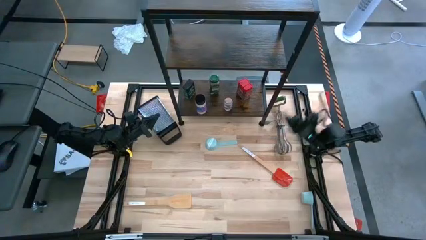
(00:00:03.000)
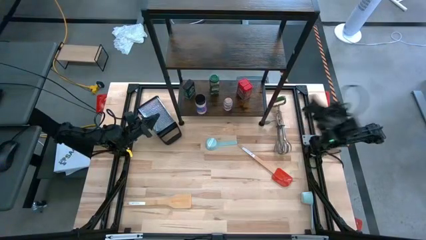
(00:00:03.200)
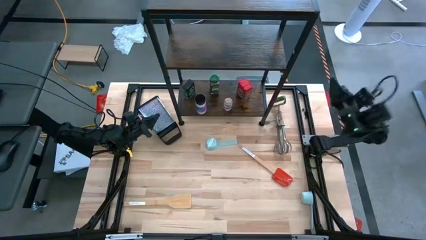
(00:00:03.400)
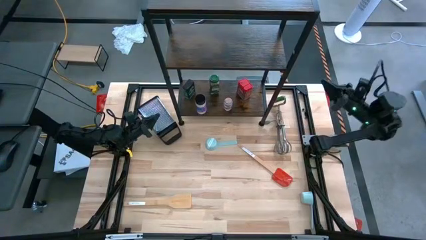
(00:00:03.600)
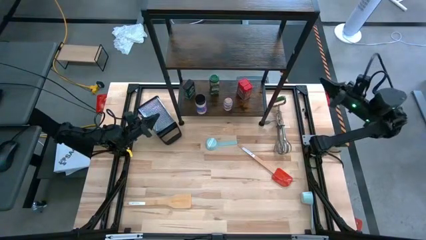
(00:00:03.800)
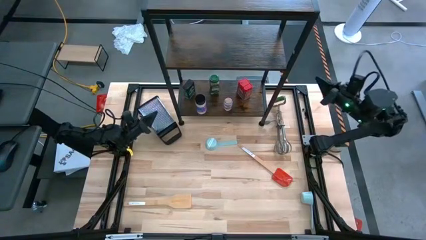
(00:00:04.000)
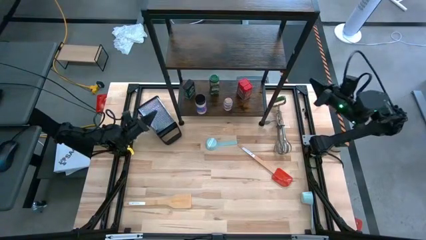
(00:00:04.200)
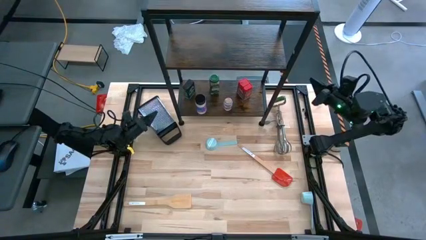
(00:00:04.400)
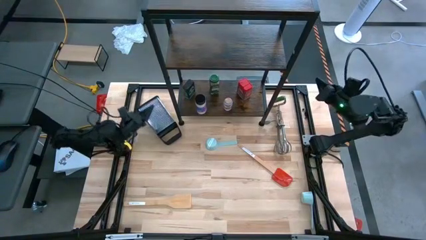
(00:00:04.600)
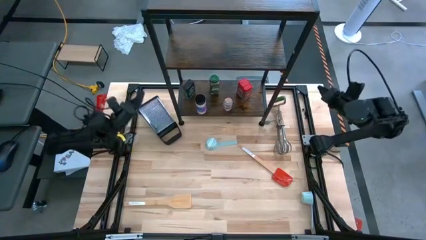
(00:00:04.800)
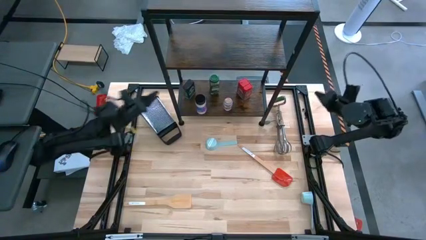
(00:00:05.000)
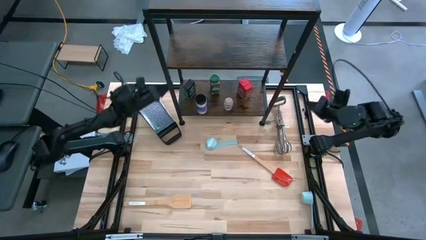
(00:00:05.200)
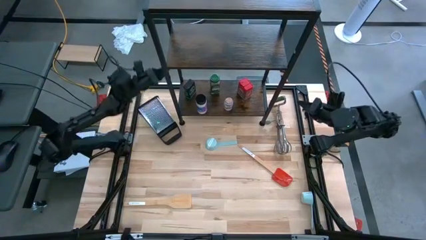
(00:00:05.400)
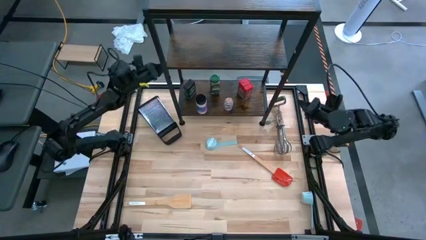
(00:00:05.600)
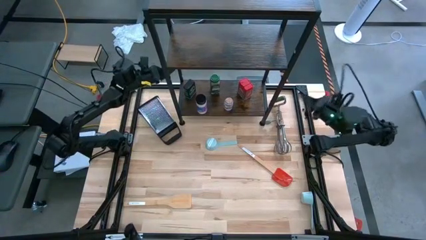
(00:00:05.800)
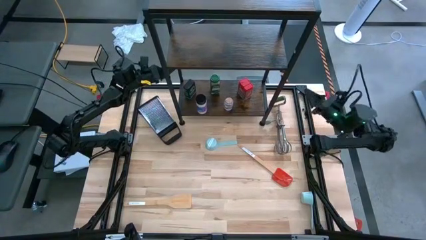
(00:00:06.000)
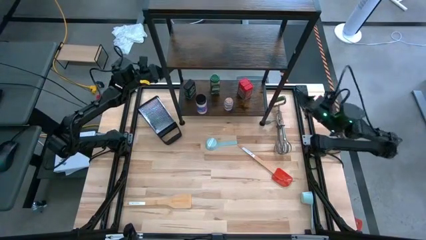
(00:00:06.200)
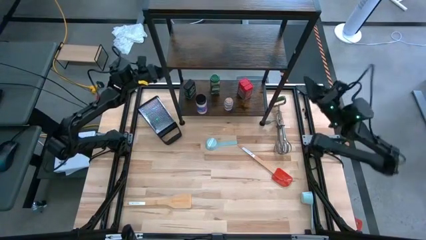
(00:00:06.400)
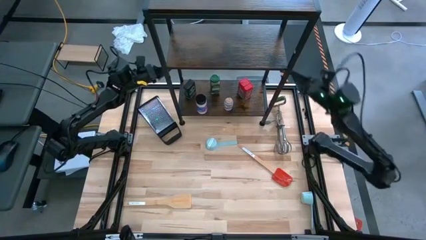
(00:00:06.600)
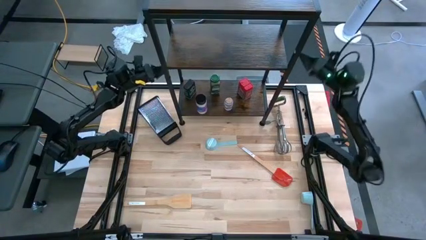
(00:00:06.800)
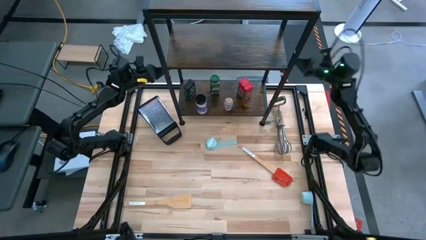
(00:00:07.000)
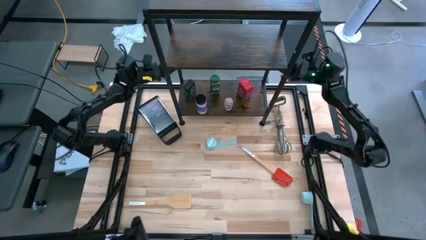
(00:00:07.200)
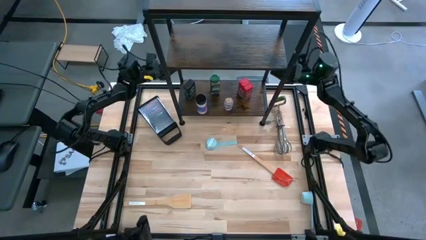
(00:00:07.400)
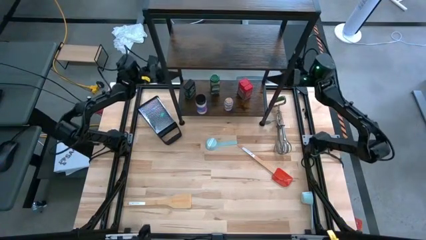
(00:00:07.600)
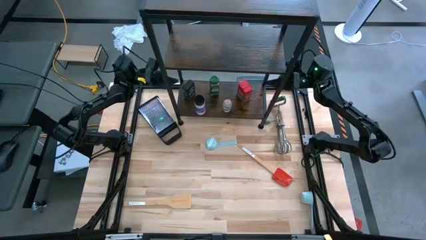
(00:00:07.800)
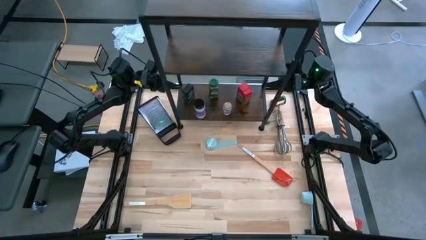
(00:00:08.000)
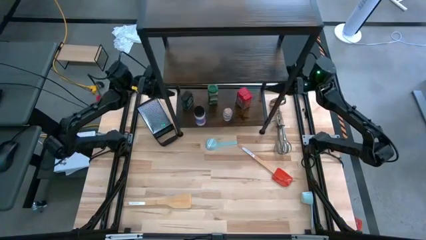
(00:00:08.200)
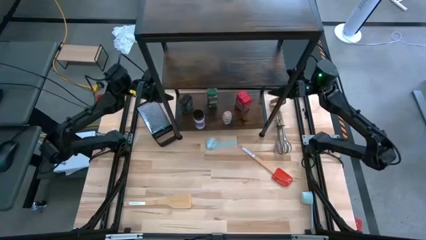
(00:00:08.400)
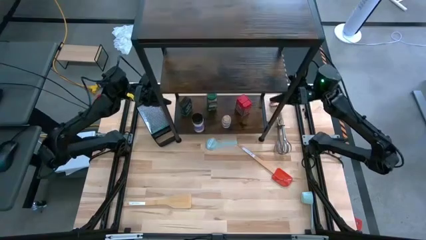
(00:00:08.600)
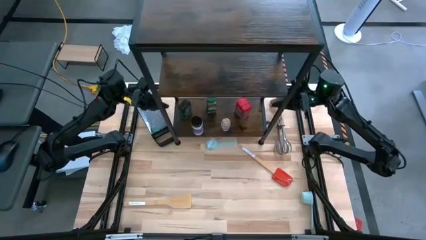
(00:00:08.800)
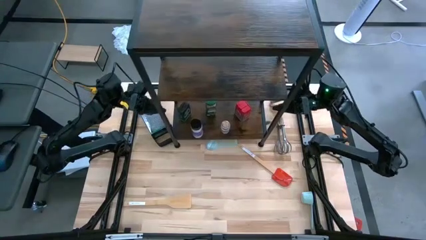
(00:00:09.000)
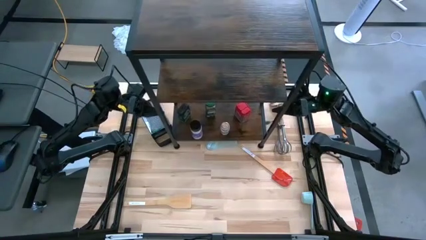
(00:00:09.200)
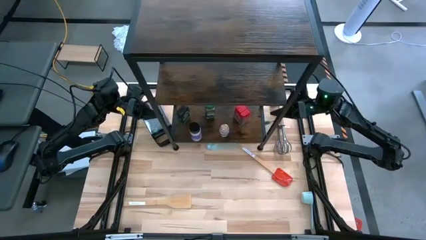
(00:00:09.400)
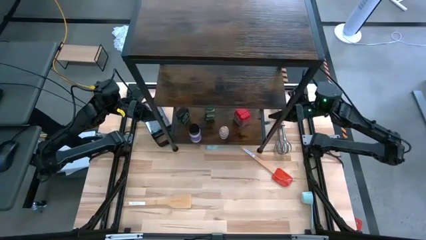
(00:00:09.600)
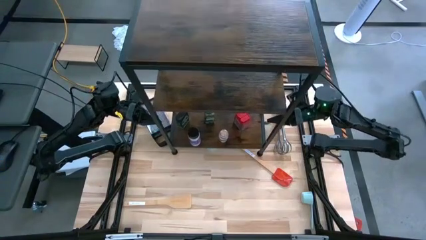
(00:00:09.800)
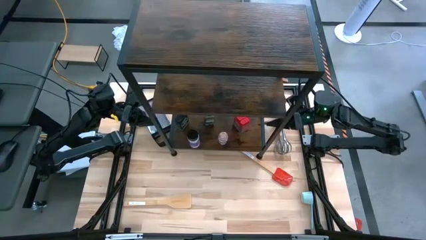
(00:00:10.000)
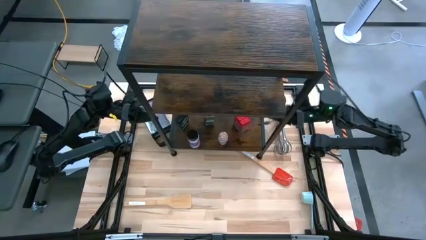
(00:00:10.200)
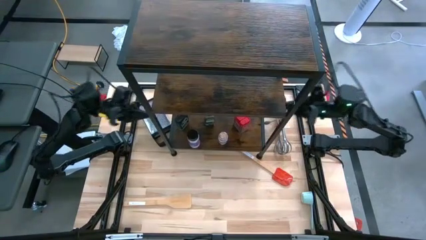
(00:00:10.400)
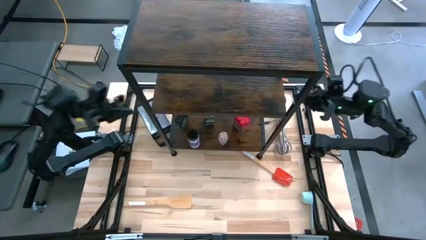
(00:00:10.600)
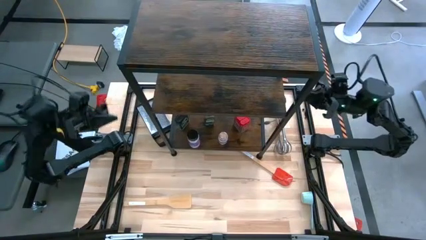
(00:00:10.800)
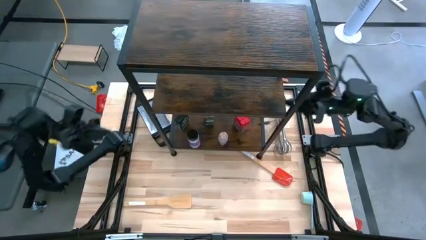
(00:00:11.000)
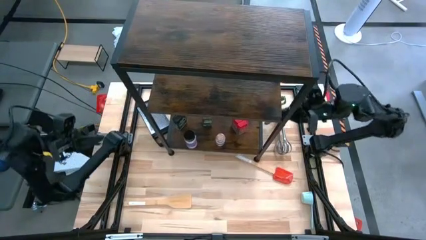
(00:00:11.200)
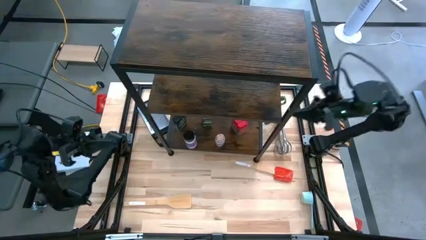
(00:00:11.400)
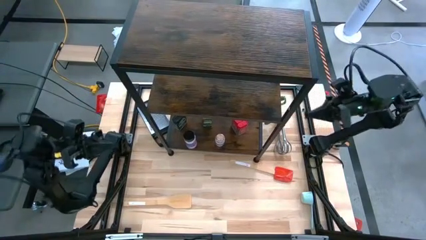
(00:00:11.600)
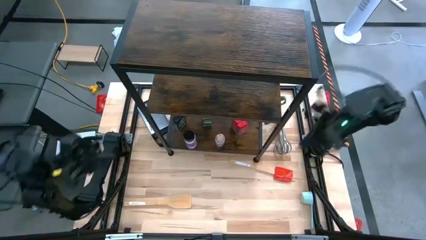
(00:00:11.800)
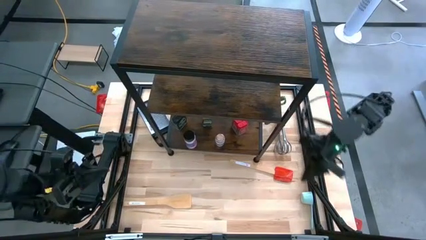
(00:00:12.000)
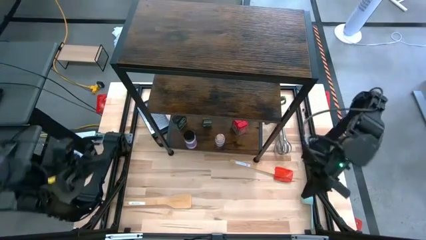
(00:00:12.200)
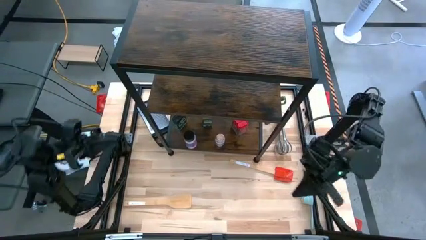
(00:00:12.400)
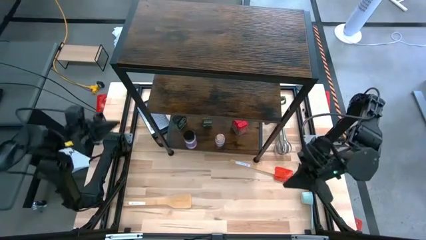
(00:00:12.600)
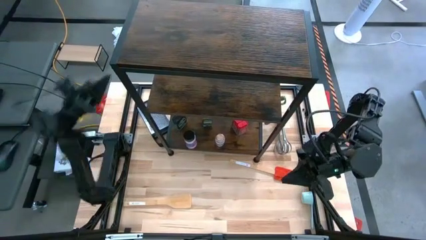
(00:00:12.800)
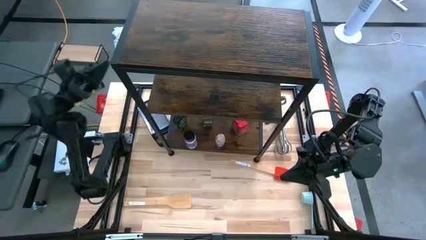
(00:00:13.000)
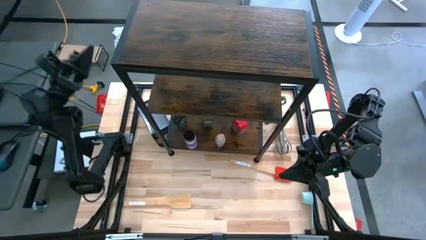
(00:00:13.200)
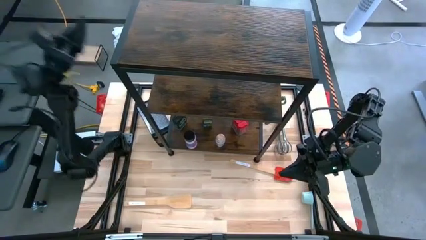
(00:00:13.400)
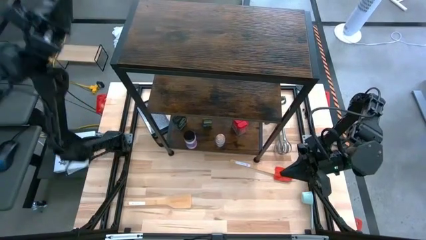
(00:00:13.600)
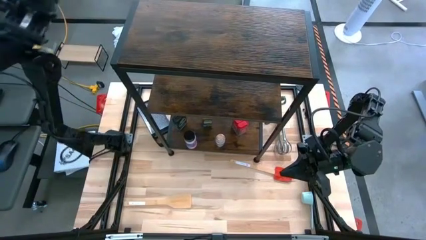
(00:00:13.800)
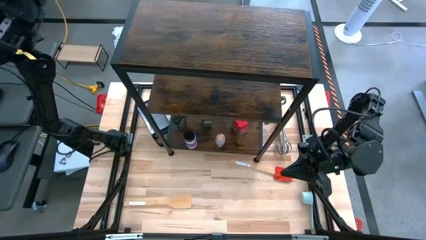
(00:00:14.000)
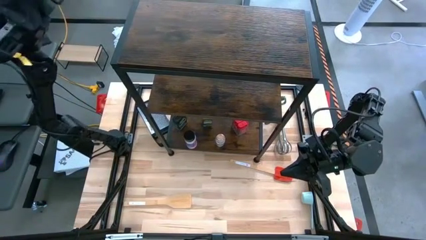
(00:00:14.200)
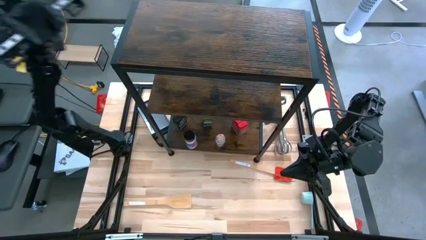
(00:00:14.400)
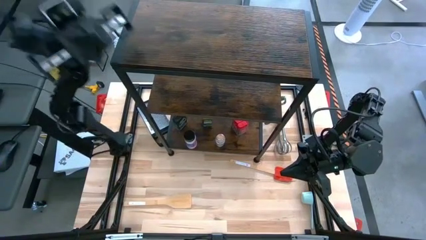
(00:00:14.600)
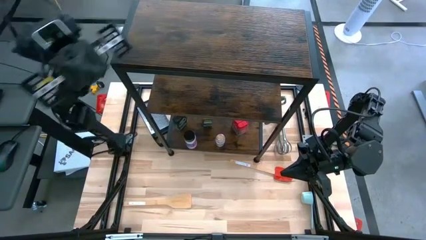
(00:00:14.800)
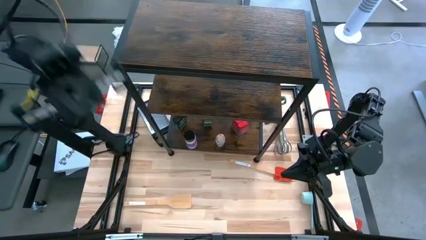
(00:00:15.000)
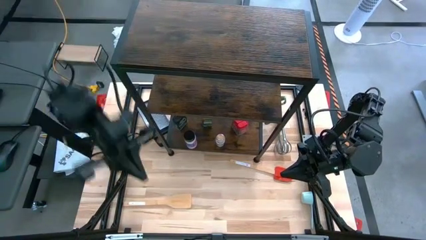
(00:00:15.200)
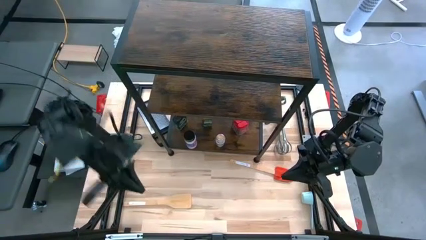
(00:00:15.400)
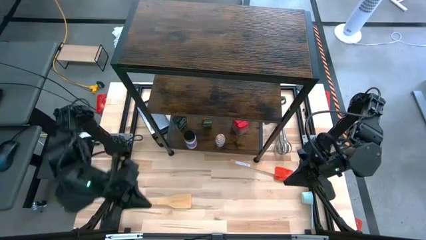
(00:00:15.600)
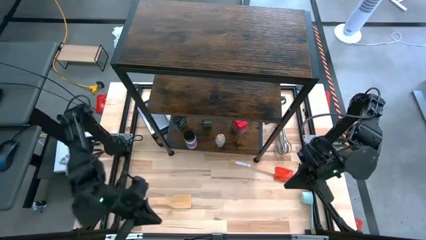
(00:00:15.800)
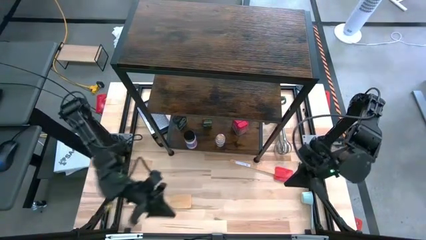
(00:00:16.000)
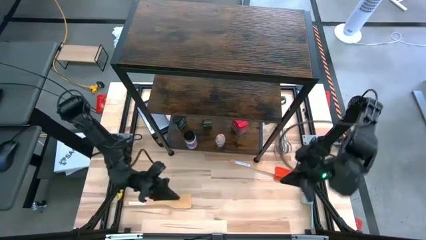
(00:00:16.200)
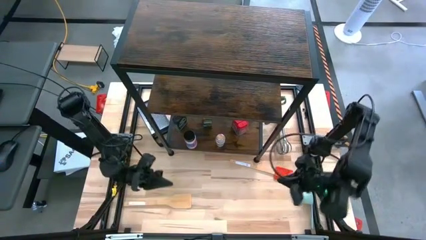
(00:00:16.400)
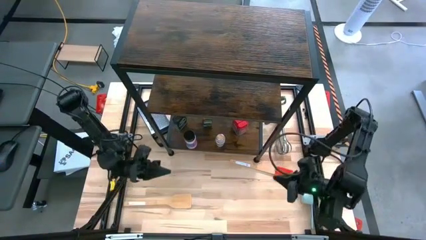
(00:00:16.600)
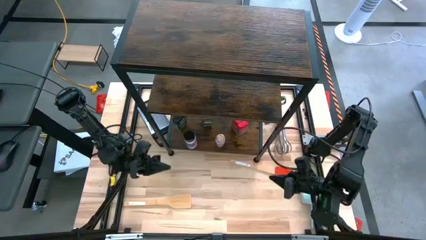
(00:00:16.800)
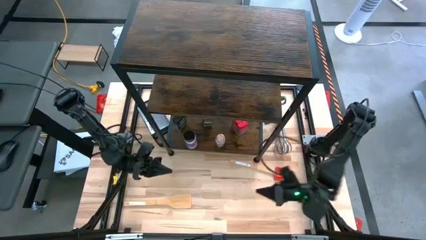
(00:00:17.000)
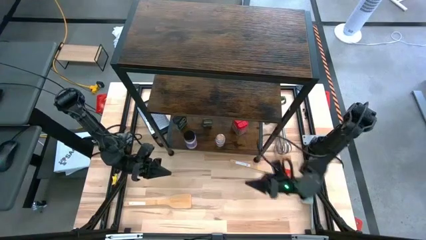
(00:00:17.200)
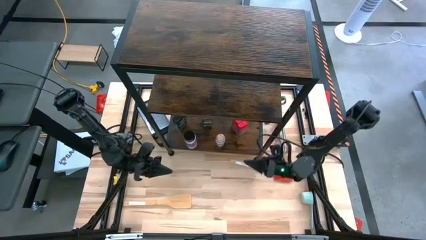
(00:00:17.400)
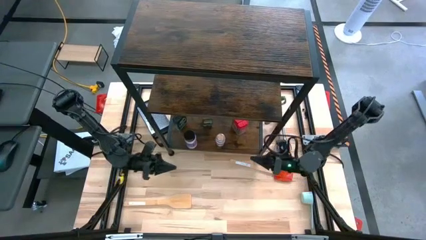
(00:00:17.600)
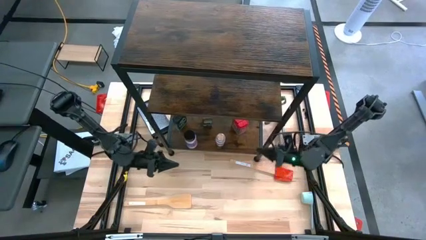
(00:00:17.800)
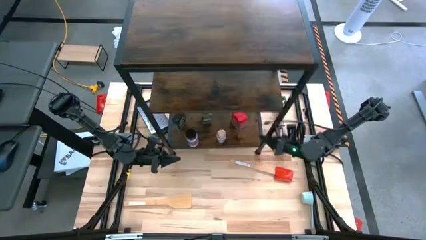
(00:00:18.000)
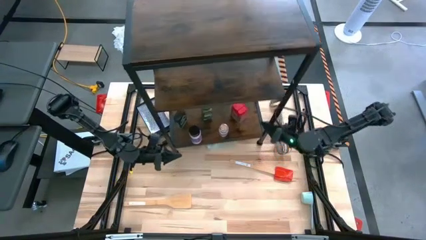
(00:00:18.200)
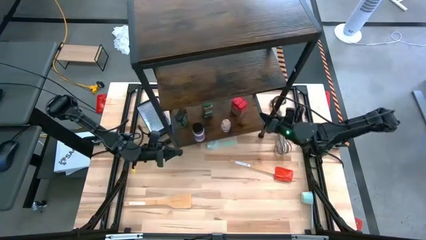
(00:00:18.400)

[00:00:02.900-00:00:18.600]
Task: Shelf spices
Adjust the shelf on the table
